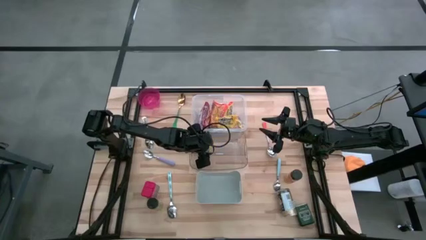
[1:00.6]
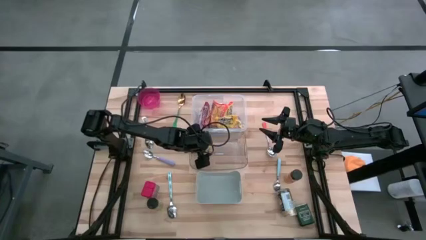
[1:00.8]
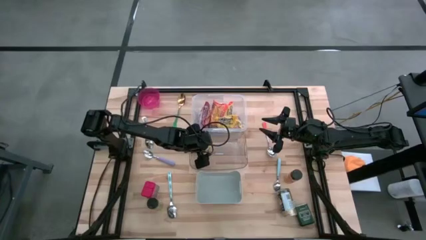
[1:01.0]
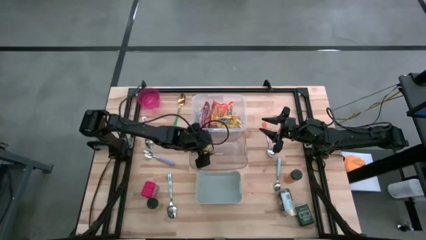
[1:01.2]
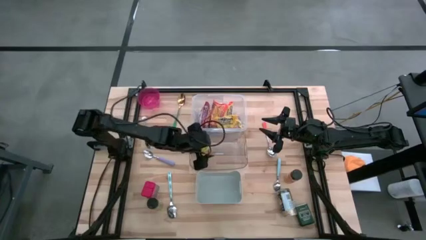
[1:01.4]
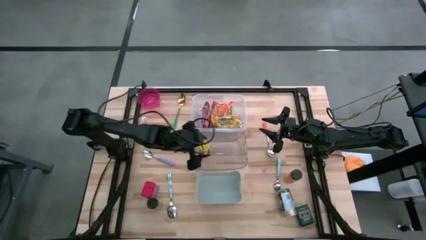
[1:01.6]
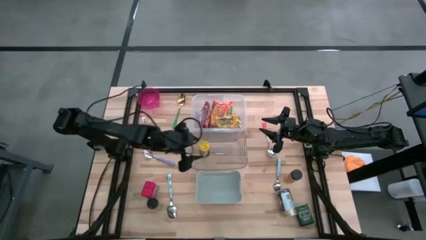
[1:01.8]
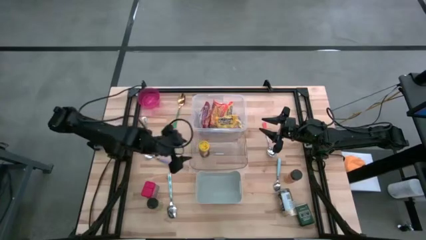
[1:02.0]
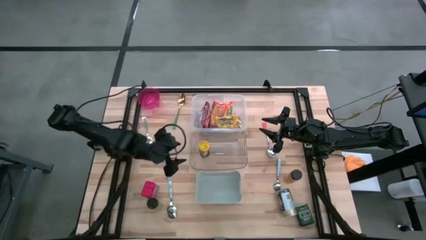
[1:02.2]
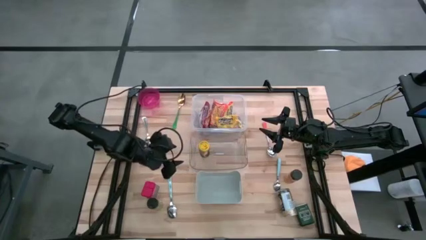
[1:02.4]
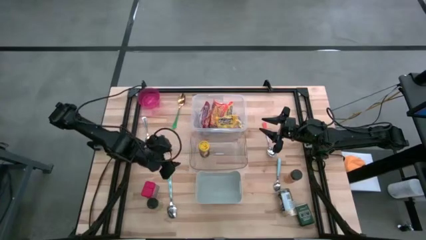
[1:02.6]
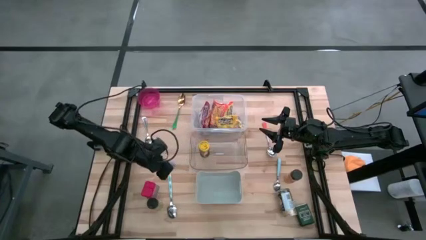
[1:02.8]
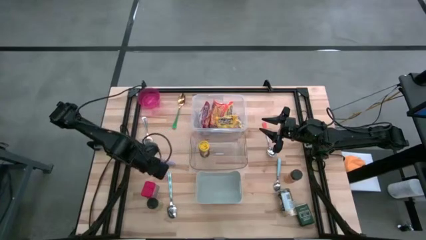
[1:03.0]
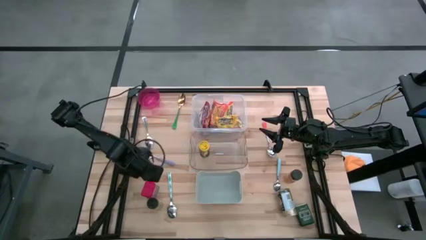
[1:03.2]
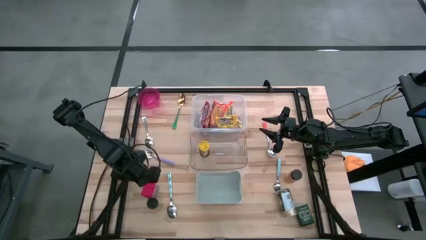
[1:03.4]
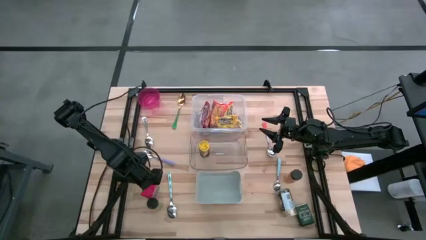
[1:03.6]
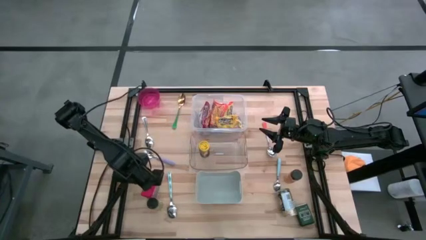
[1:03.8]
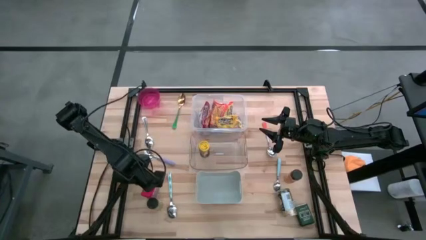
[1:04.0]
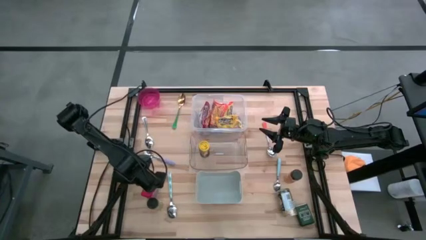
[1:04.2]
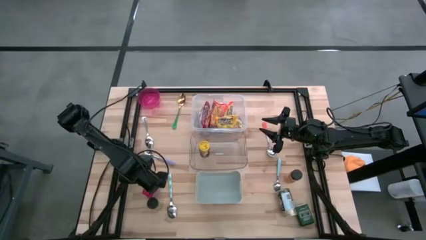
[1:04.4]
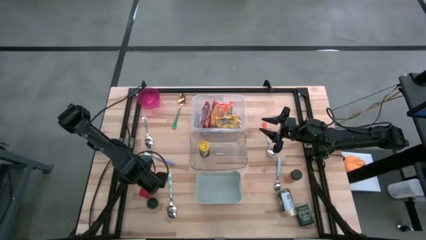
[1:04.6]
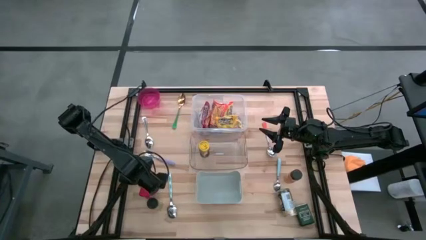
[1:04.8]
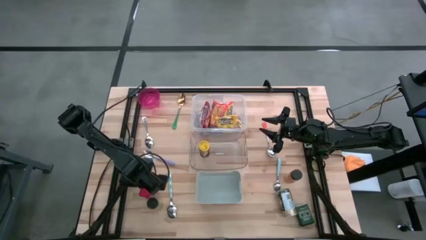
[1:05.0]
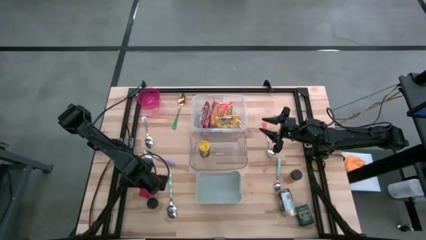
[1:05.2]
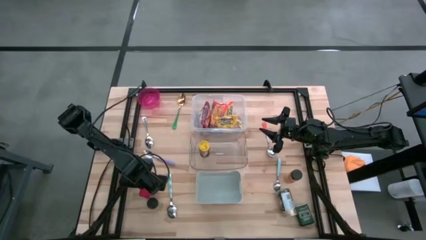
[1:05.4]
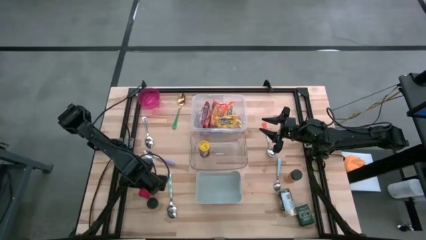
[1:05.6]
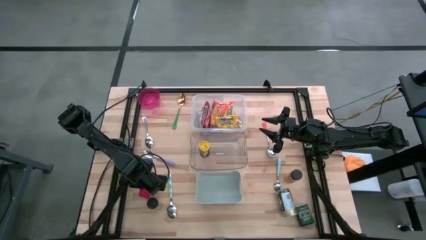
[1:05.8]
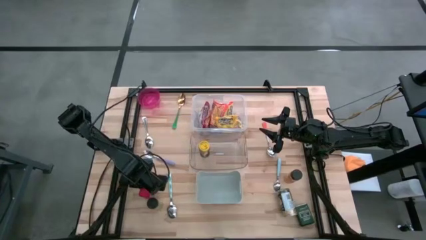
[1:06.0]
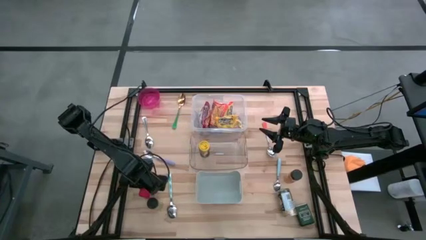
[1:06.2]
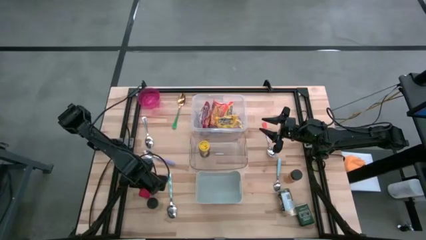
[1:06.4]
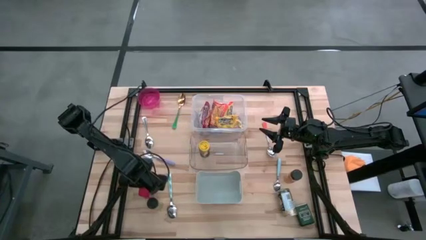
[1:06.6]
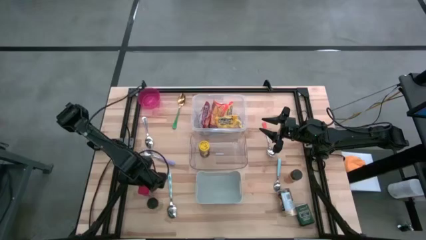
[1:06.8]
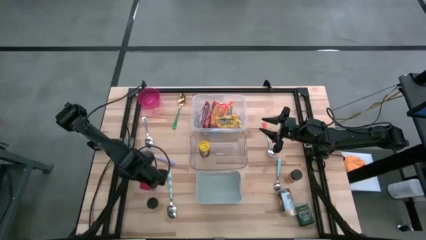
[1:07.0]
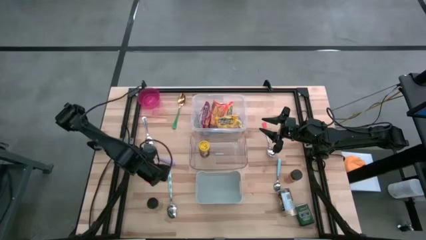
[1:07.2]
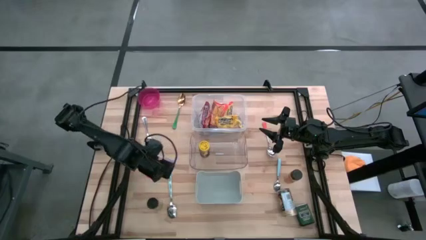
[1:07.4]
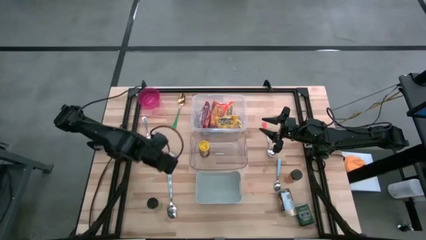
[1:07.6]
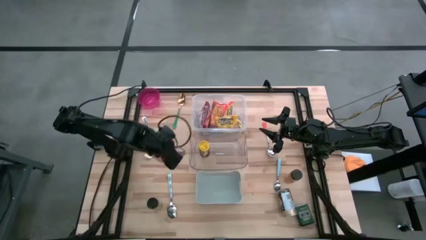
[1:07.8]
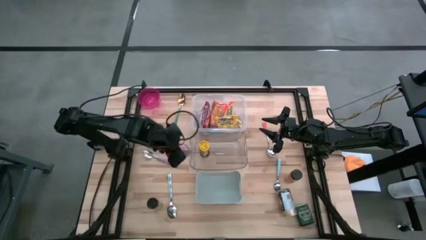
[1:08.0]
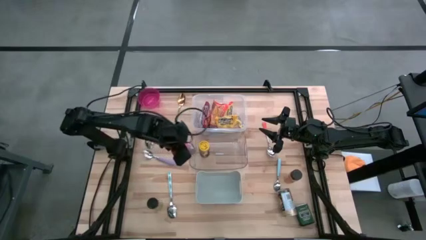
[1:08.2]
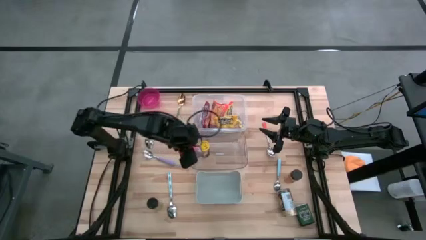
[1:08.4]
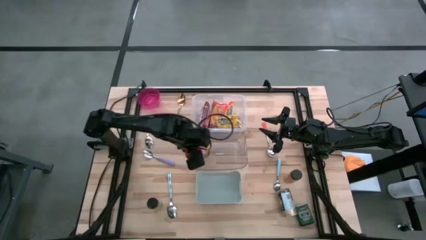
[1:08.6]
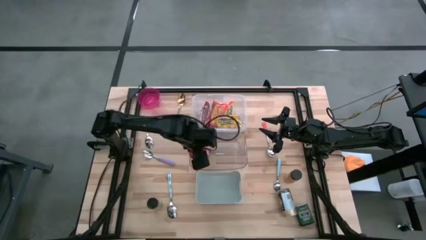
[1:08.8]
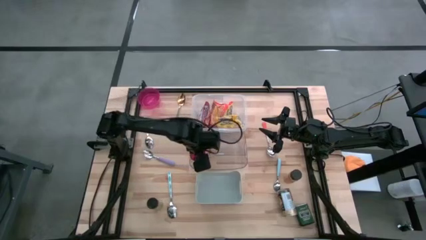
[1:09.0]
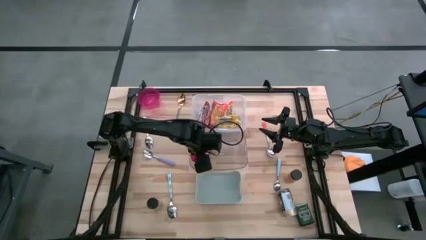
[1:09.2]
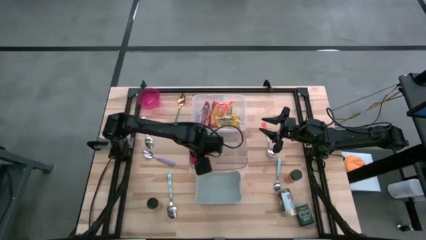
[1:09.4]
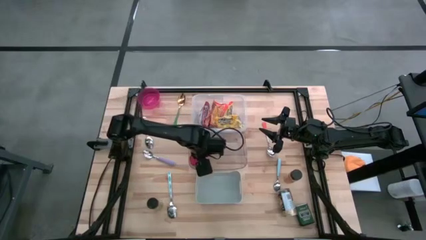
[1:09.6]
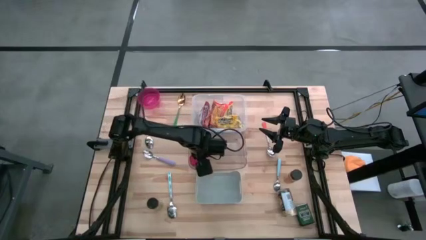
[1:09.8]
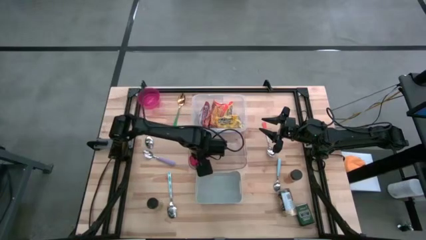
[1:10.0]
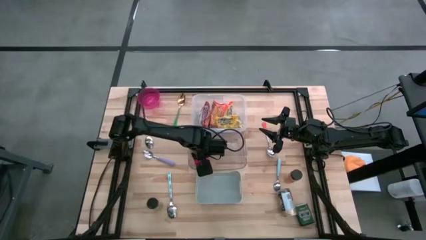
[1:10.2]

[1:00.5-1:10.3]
Put the red spice can into the transparent bin
